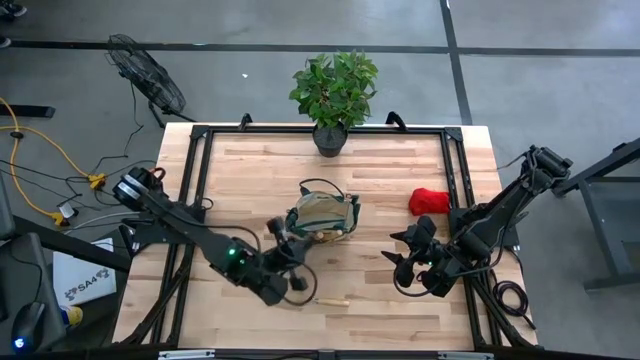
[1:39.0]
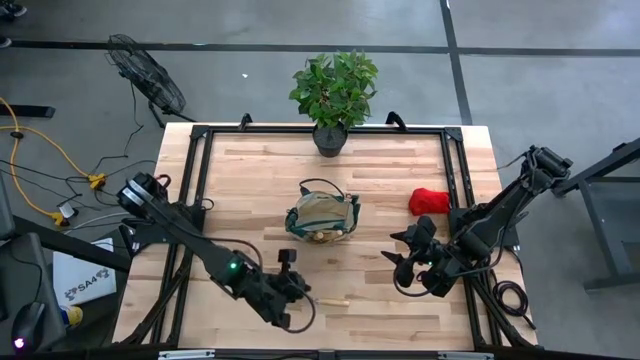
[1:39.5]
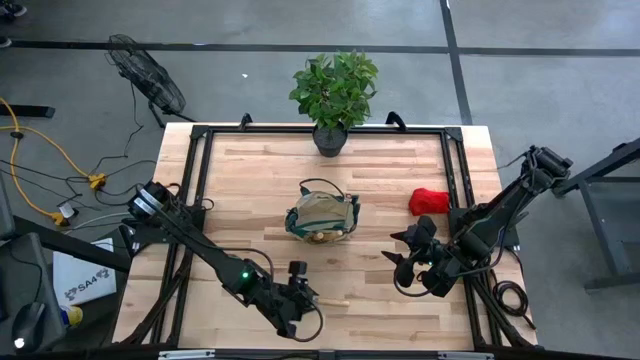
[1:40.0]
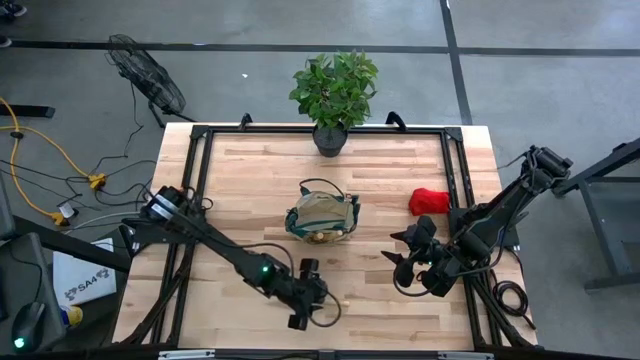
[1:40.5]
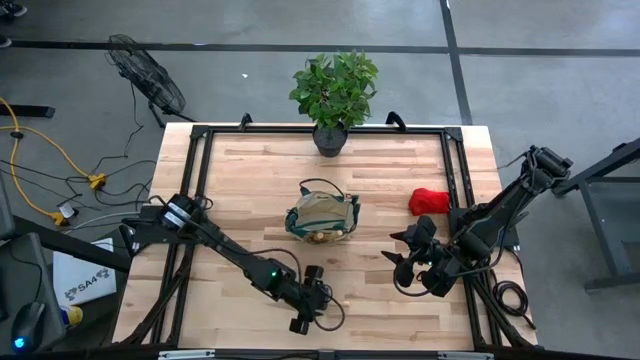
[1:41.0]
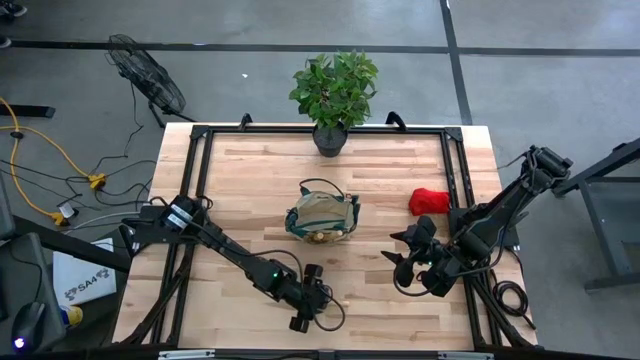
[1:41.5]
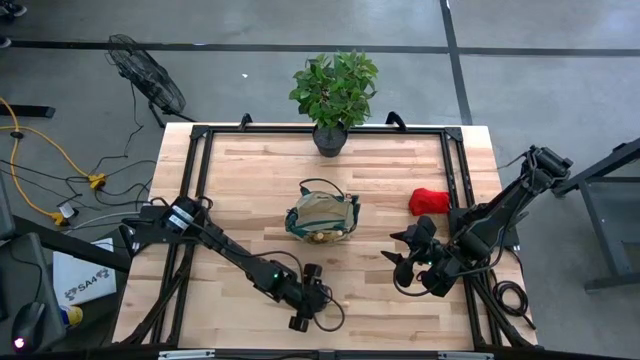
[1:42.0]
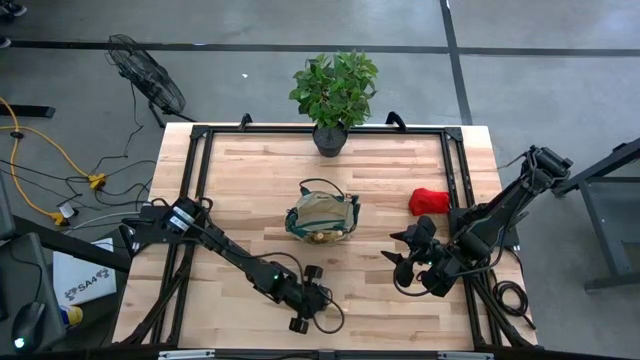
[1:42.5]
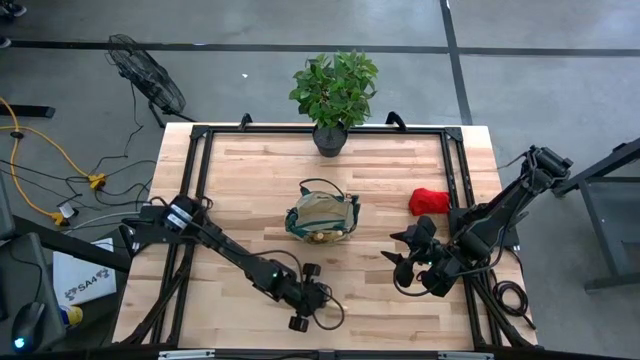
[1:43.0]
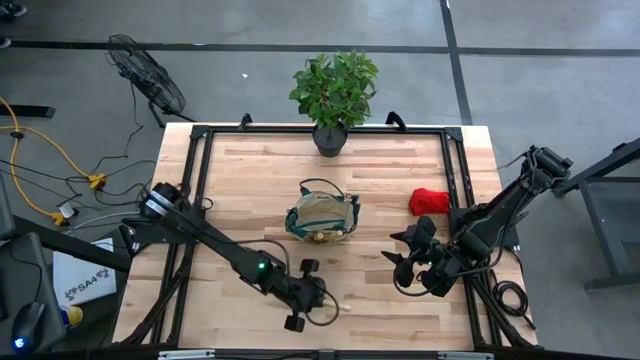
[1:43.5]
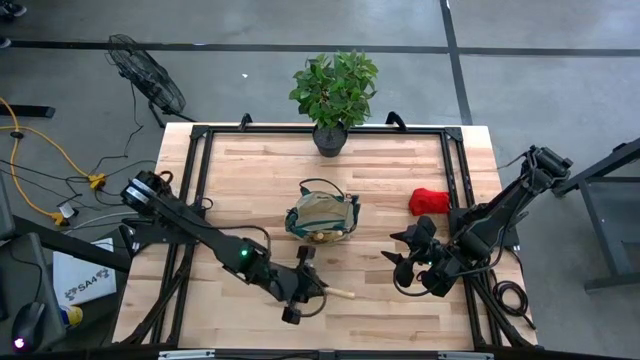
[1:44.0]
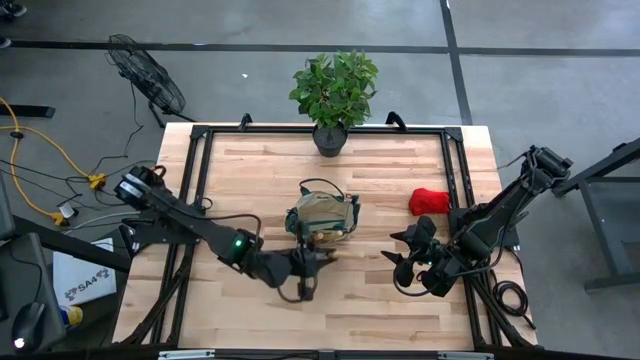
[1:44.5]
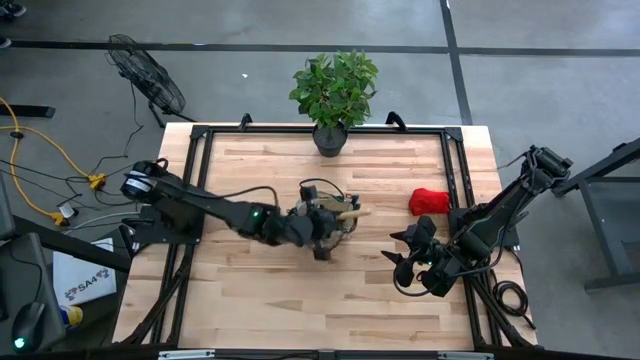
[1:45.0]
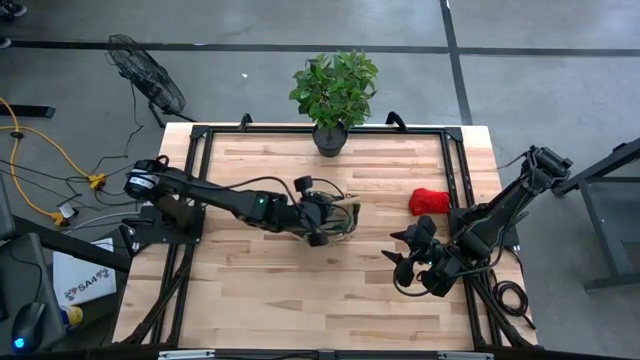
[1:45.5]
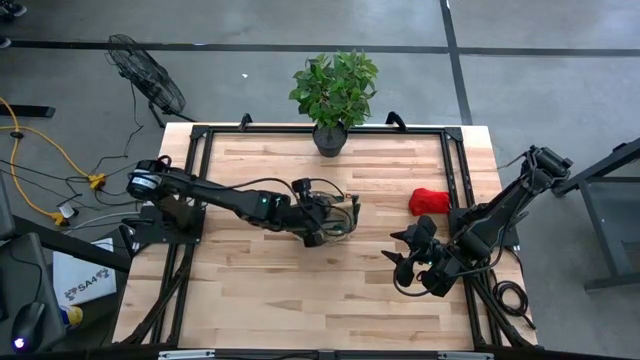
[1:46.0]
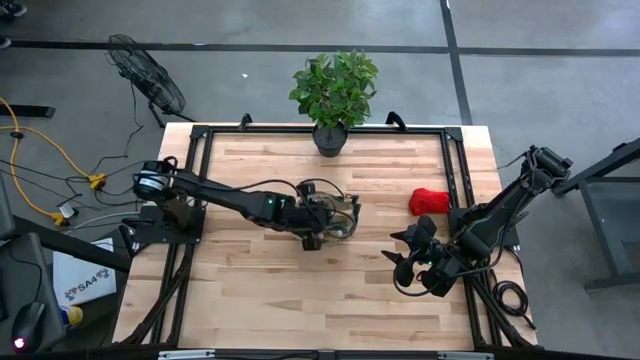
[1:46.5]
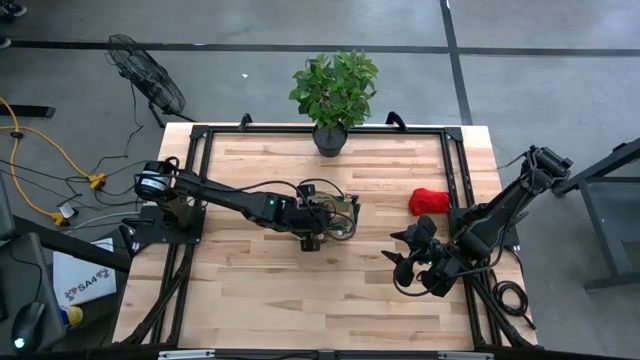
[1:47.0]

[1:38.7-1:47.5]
Task: Pick & Place Garden tools in Gardening bag
Put the brown hand rake into the gardening bag

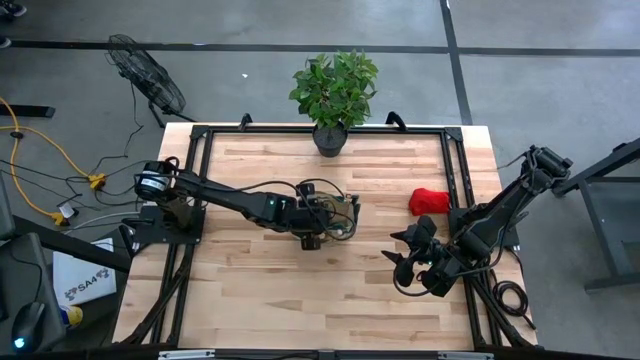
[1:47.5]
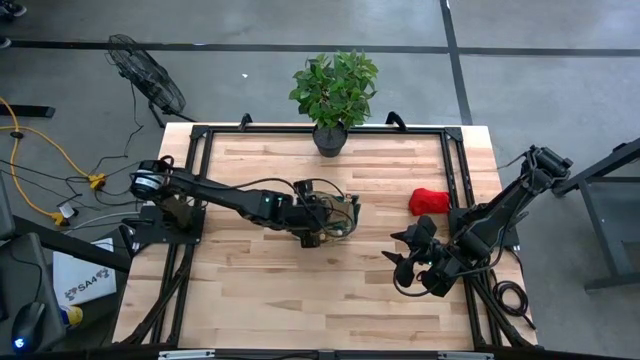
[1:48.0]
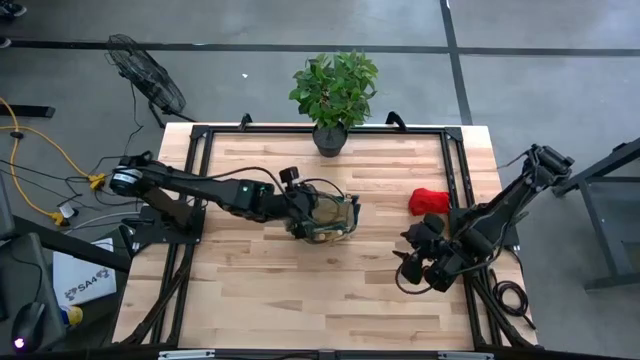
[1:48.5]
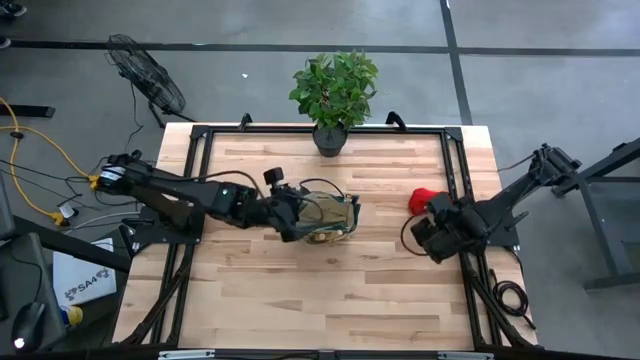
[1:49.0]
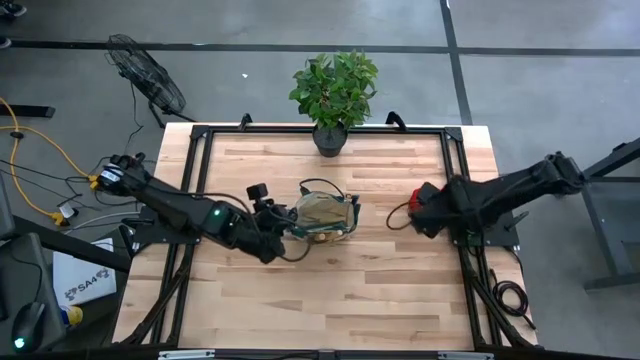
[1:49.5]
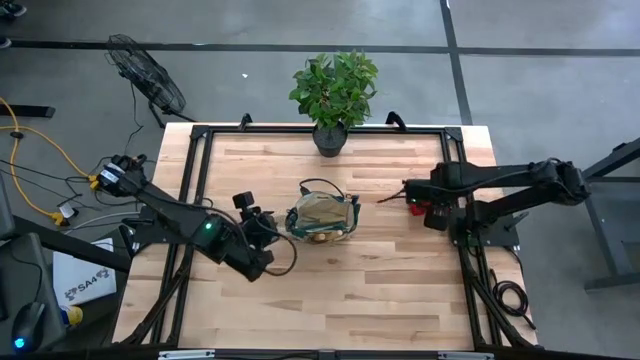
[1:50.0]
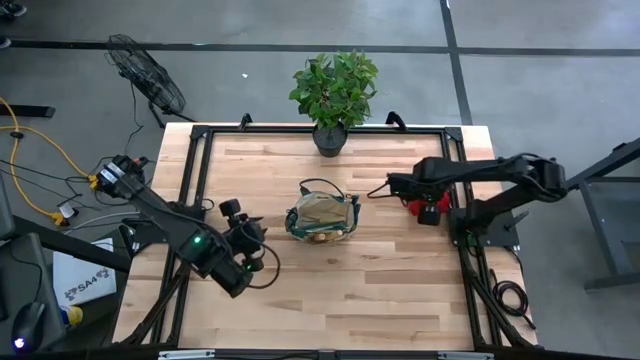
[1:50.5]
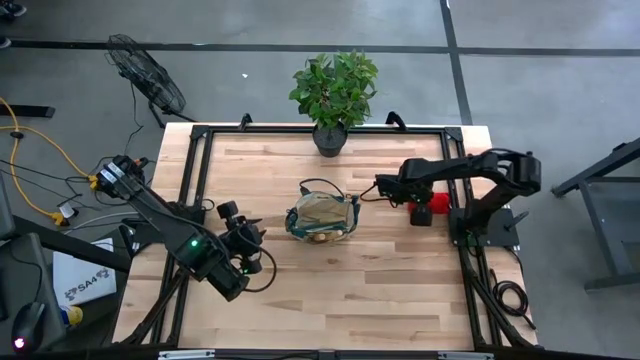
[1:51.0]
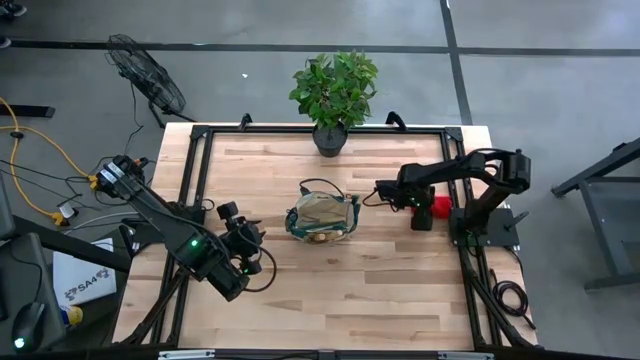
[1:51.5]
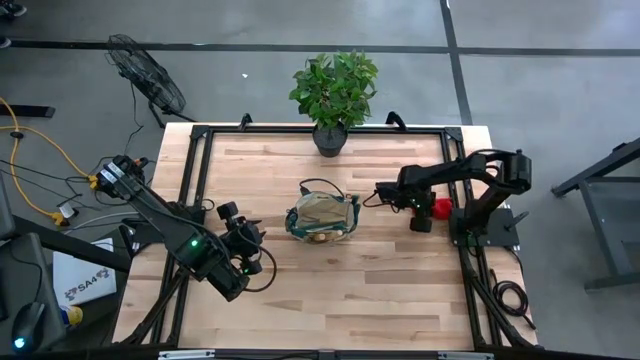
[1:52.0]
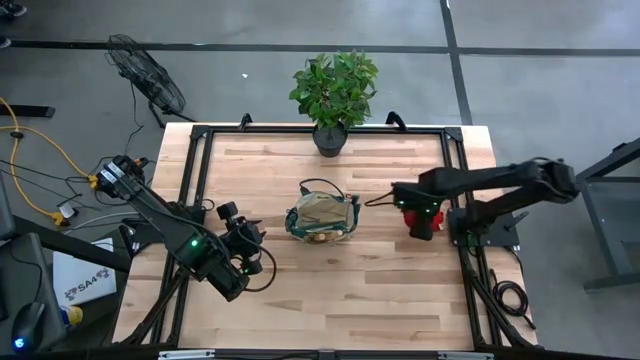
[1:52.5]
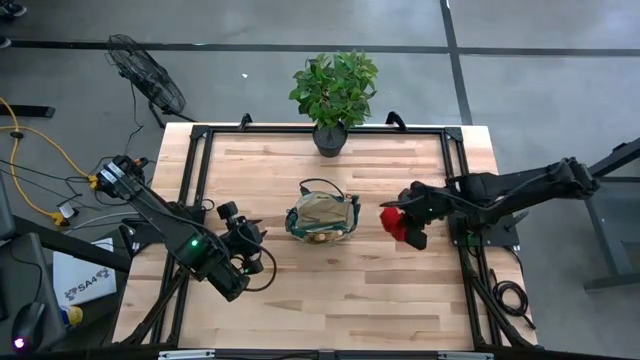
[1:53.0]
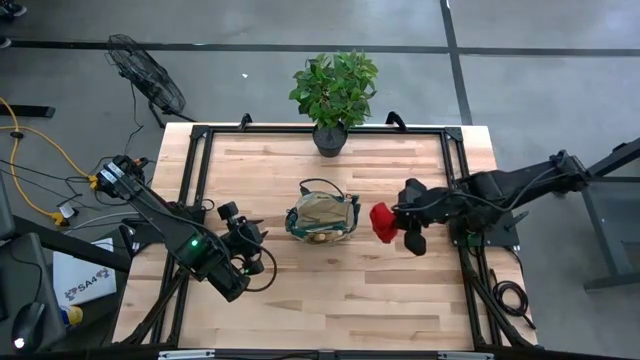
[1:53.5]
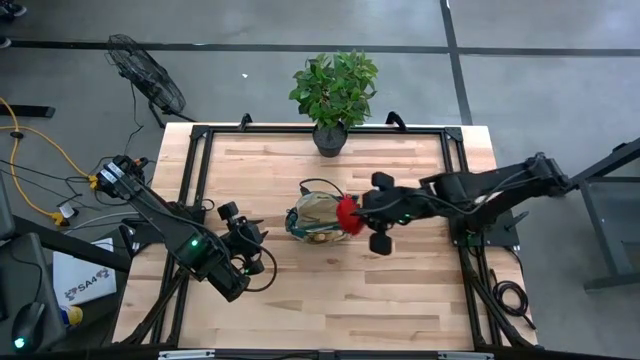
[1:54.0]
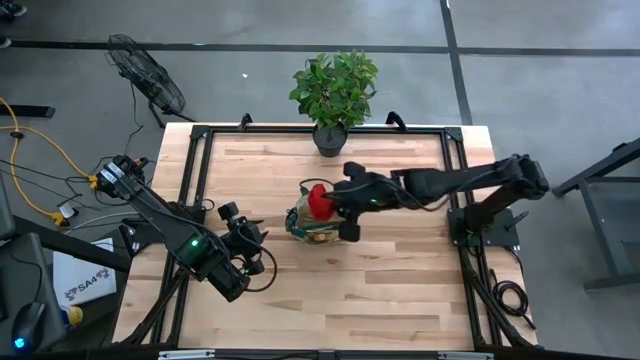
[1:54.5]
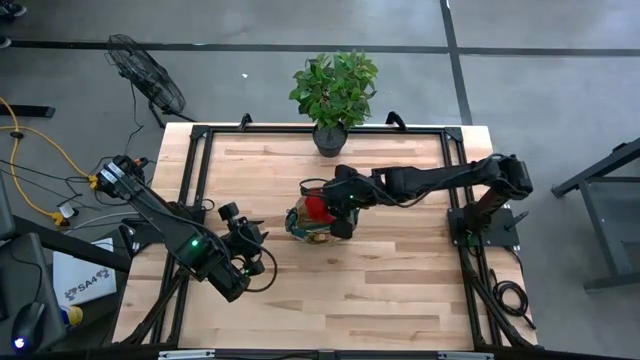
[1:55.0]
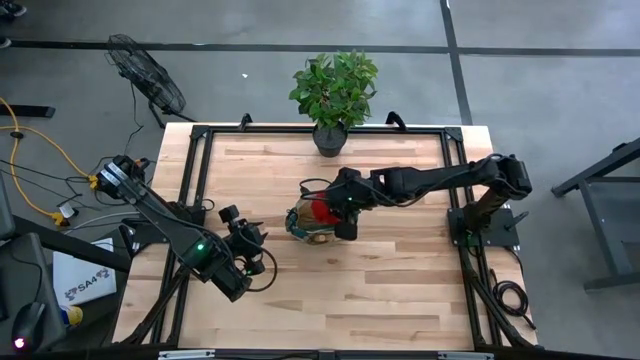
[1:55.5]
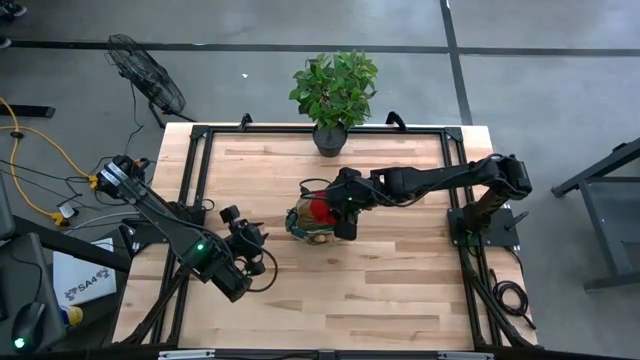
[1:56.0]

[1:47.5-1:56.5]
Put the red gloves into the gardening bag

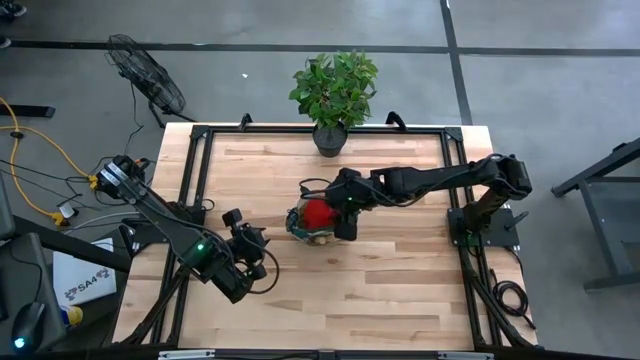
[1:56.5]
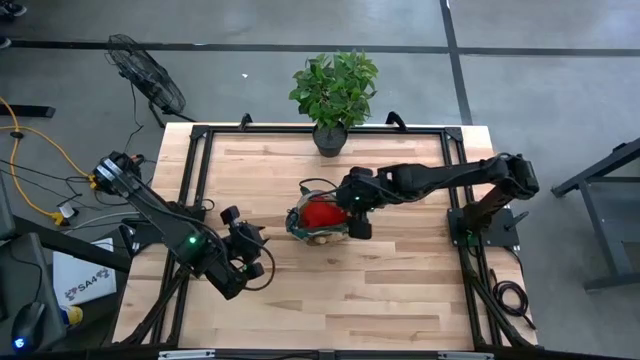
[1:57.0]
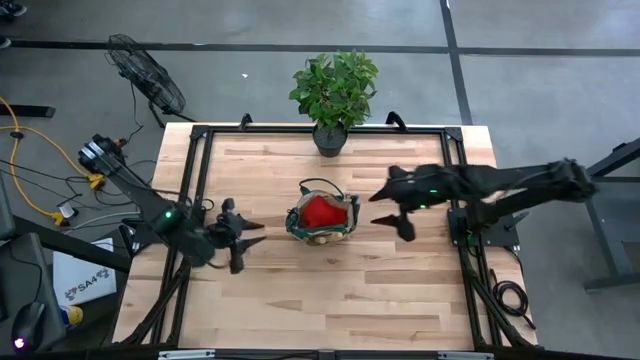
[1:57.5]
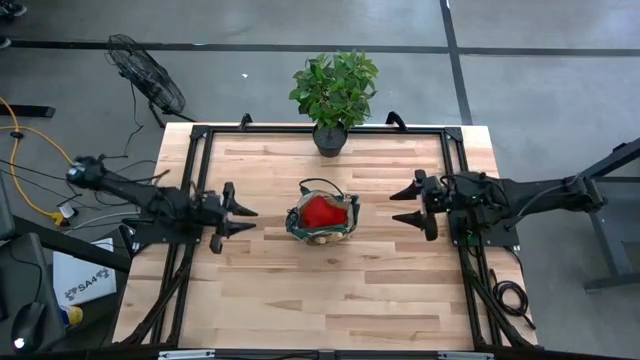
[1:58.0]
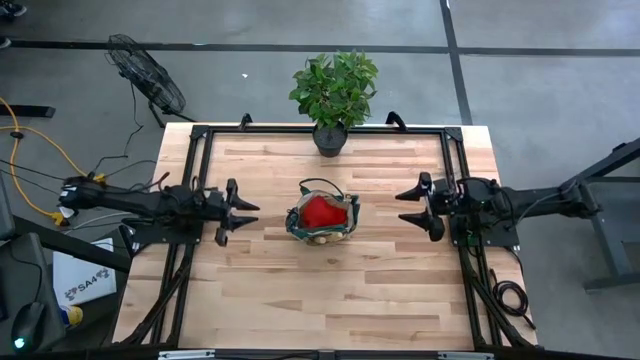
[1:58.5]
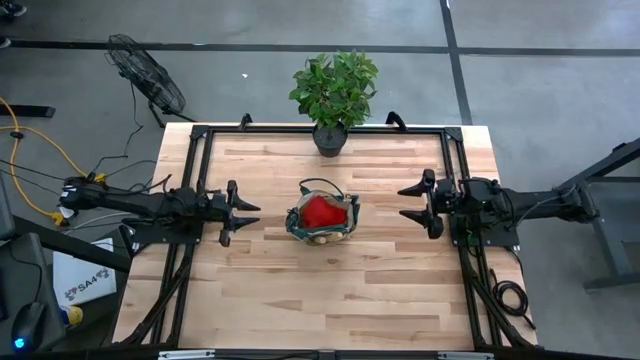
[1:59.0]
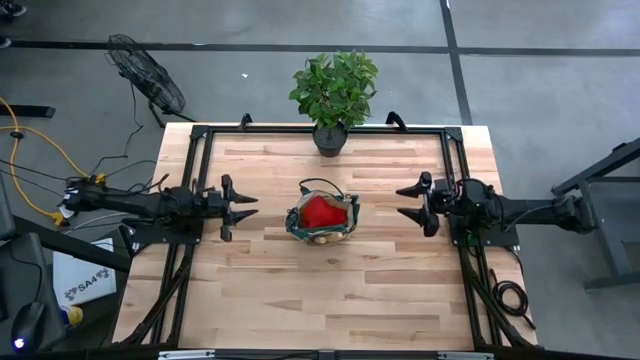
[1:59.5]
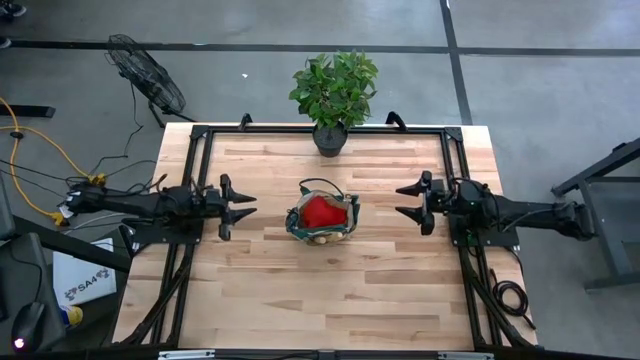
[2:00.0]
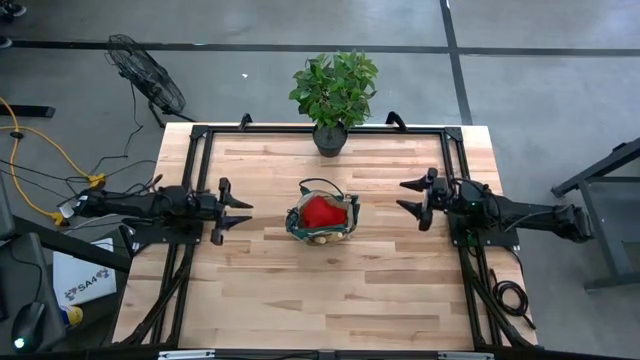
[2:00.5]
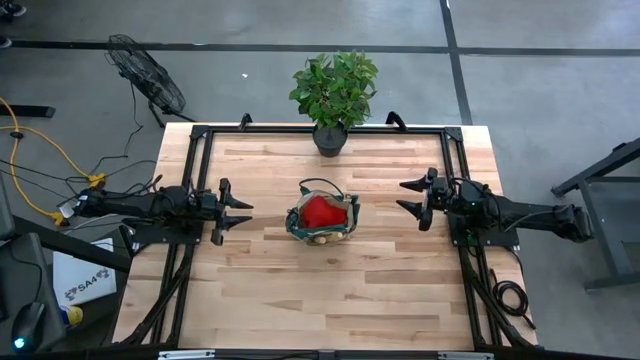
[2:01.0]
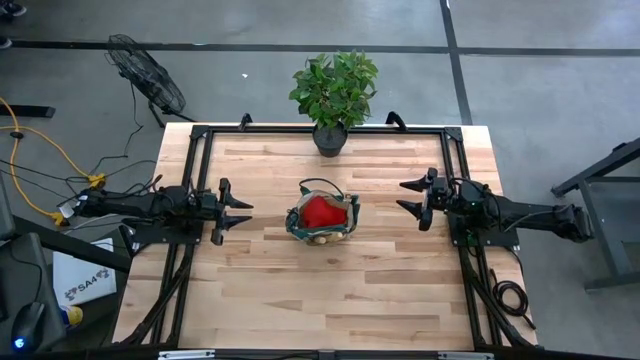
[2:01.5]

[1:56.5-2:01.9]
Return to Home Position
